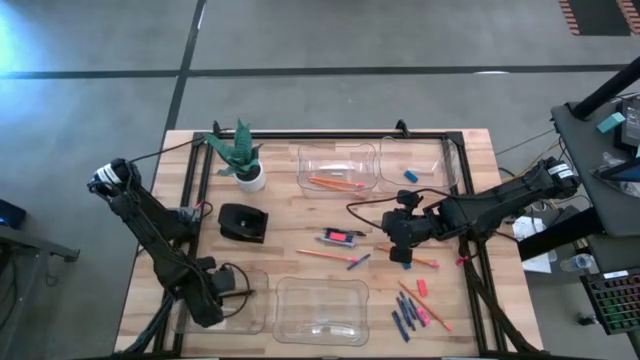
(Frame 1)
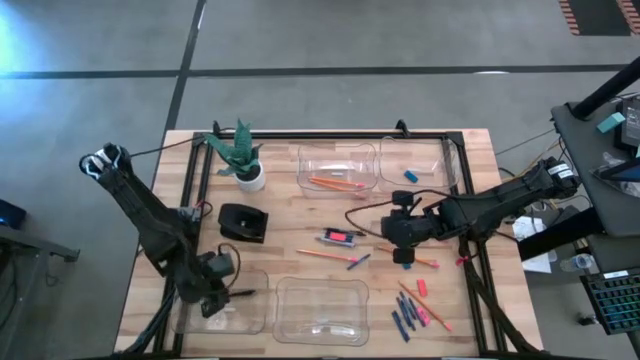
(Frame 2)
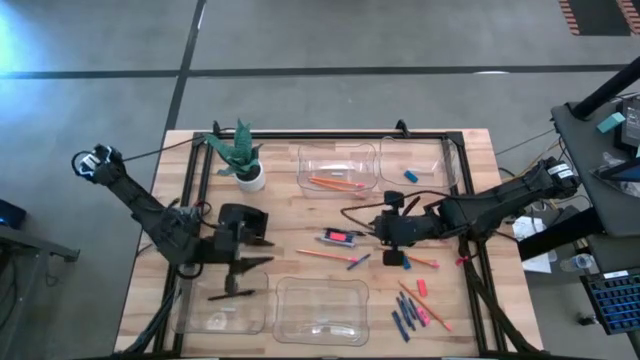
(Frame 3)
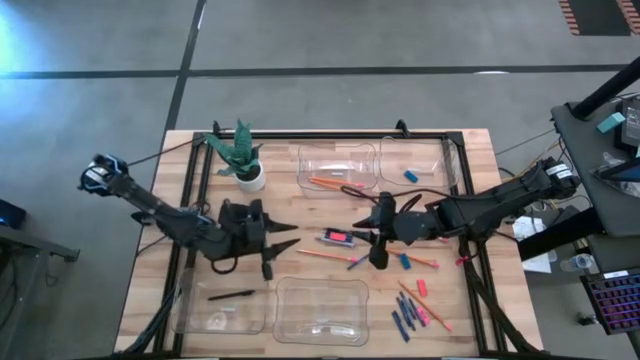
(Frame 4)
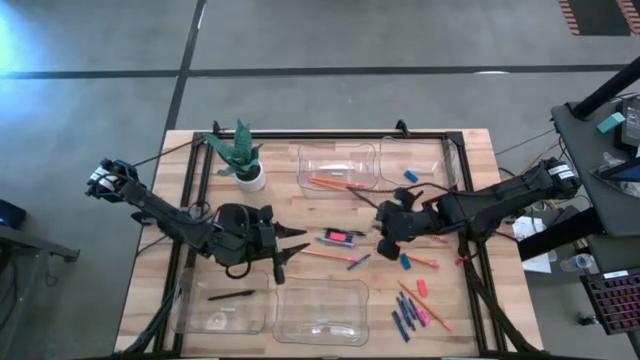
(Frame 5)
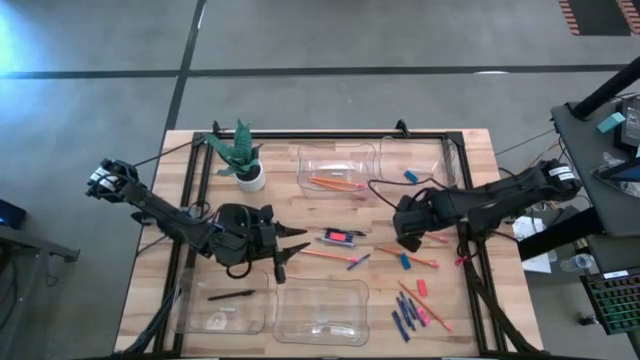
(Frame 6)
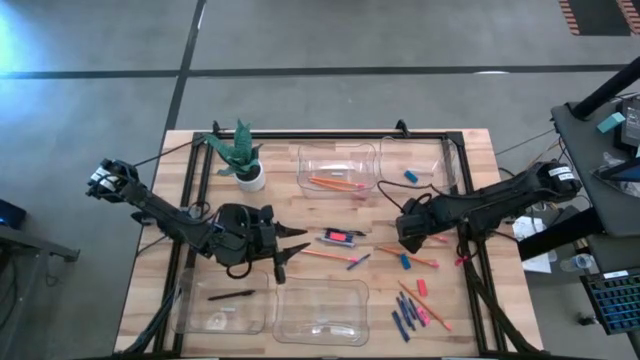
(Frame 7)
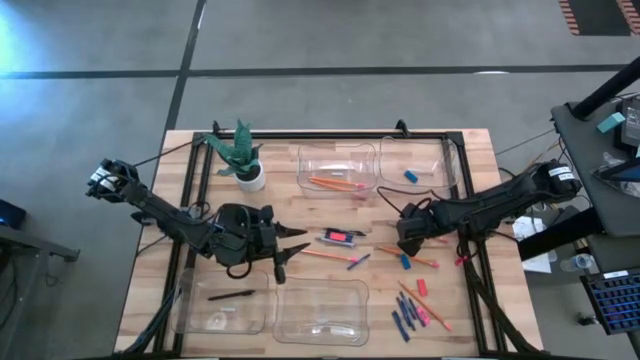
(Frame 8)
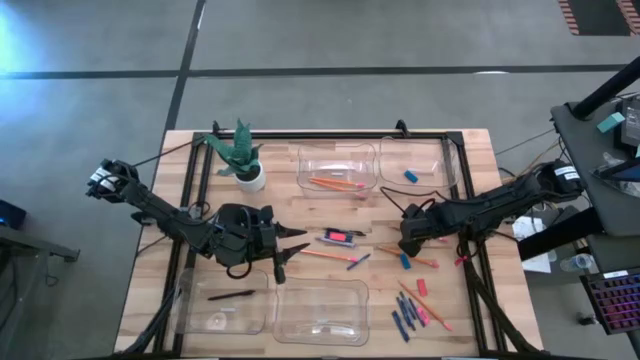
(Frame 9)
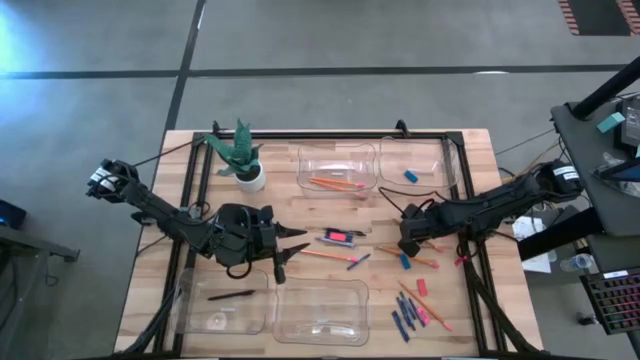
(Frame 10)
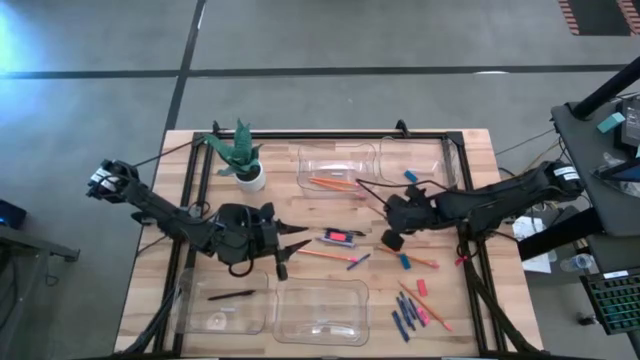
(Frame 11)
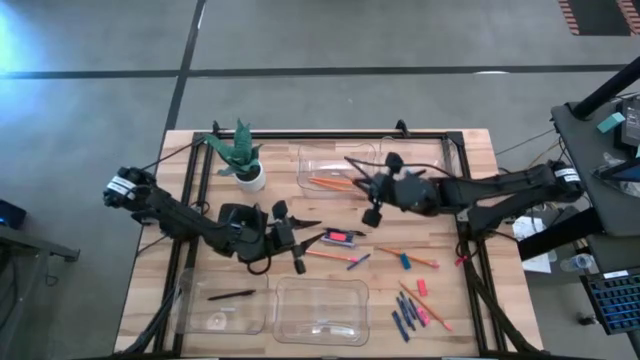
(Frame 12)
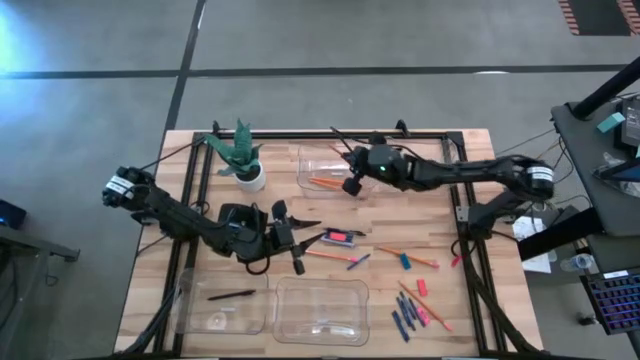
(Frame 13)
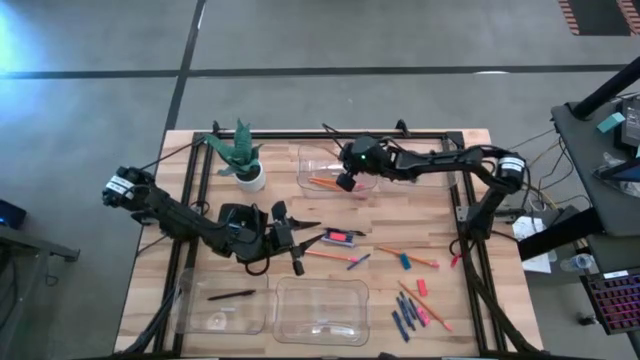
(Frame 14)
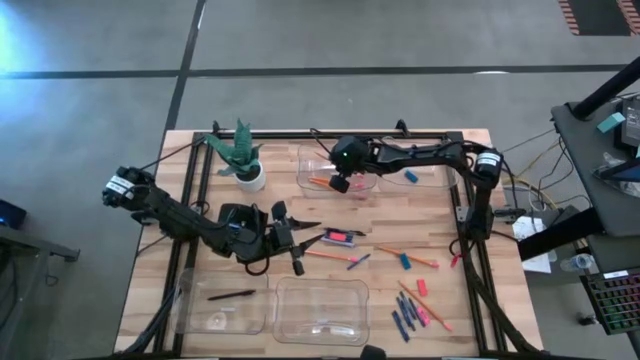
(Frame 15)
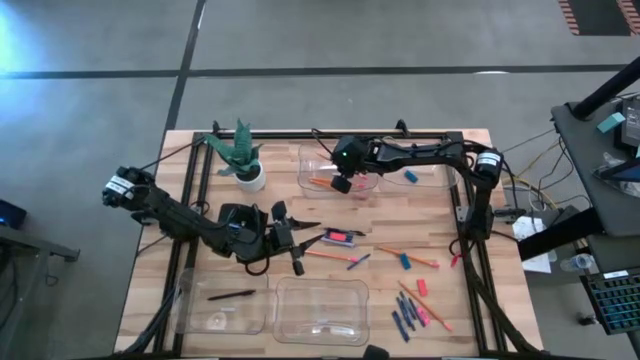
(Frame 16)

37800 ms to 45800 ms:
Task: Sort crayons/erasers/pens/pencils in bins
Put the yellow pencil into the top left transparent bin

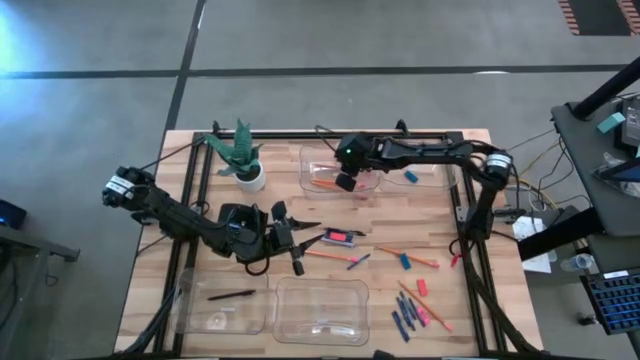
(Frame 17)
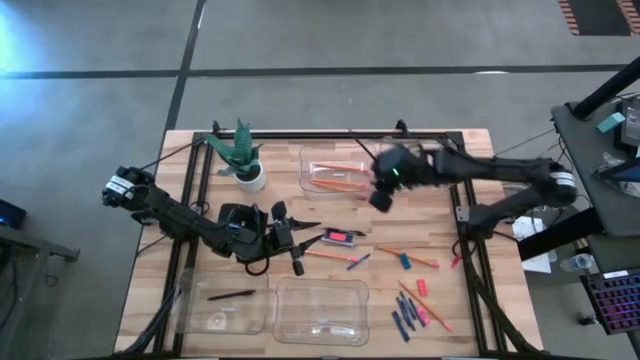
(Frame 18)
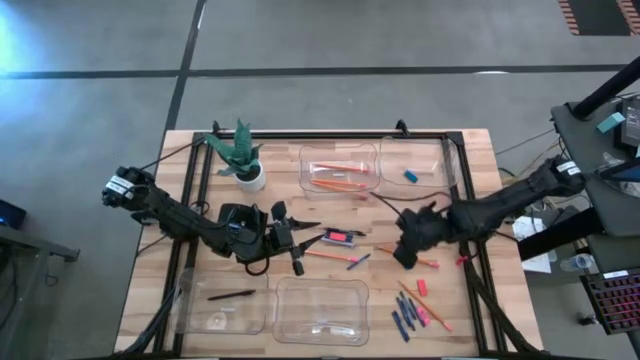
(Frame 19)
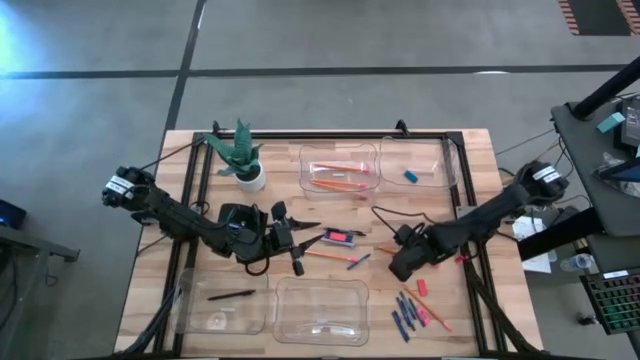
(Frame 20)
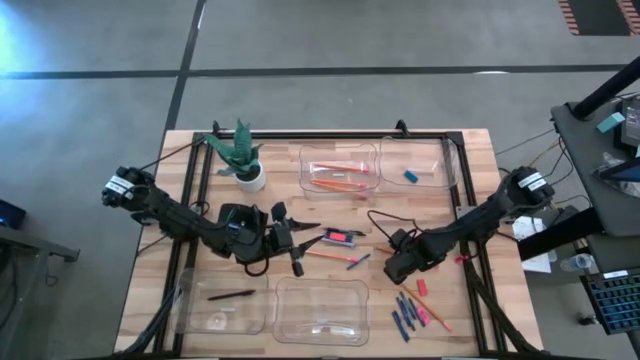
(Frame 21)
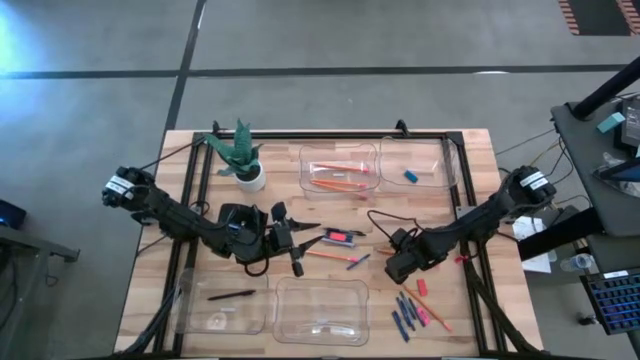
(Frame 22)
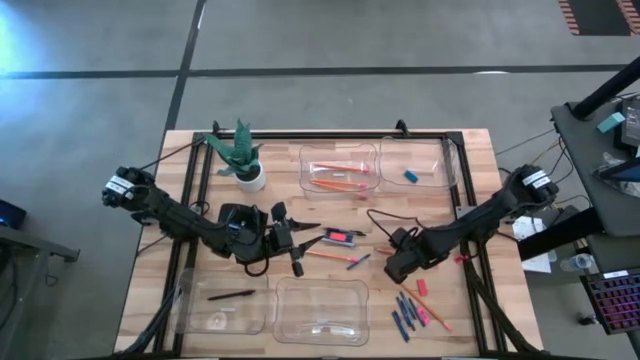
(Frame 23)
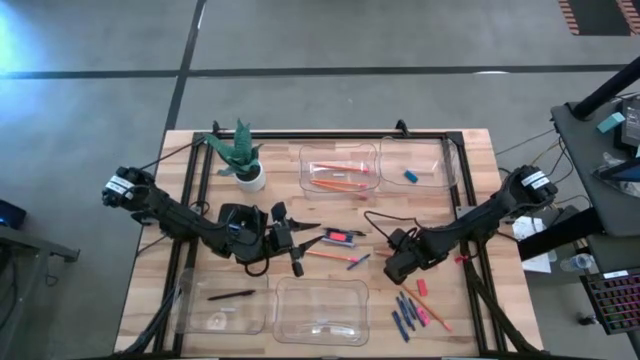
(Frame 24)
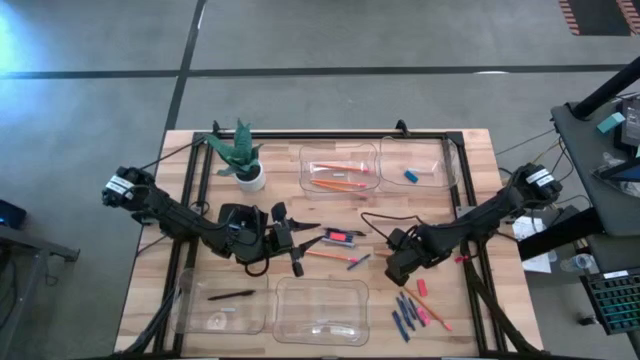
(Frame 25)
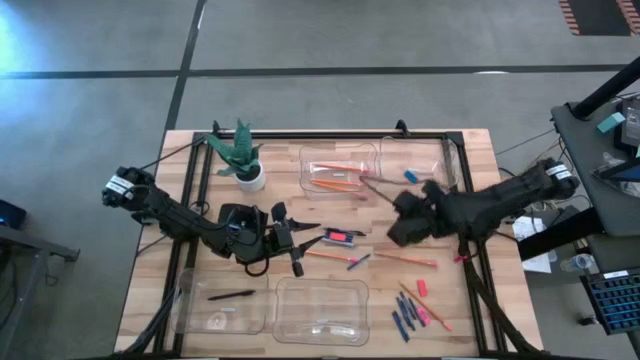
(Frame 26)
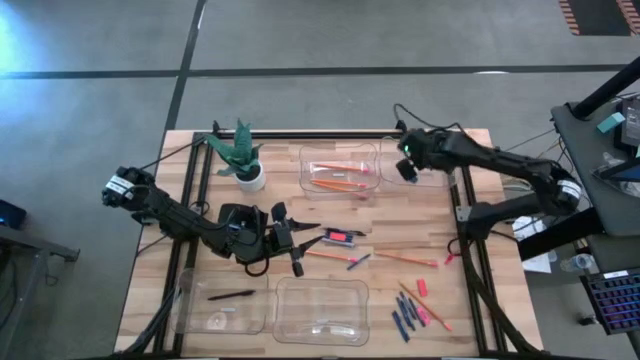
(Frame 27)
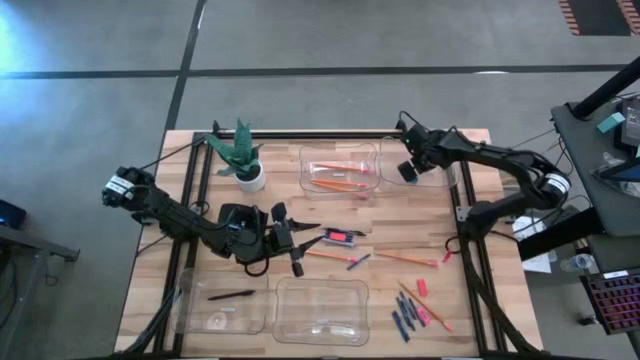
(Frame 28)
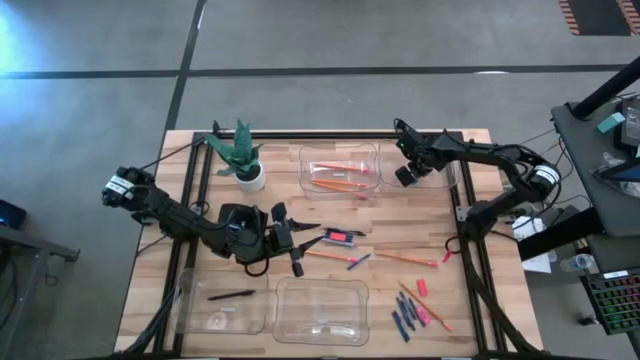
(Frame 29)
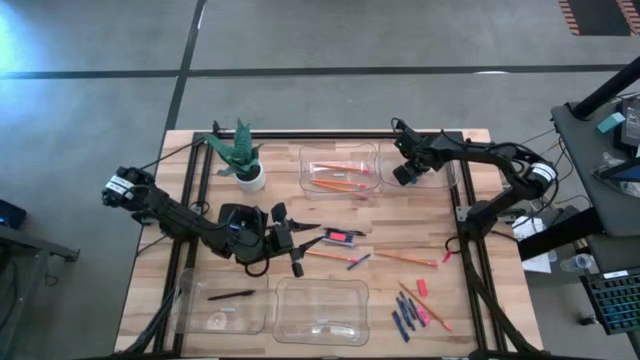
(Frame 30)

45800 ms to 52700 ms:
Put the blue eraser into the top right transparent bin

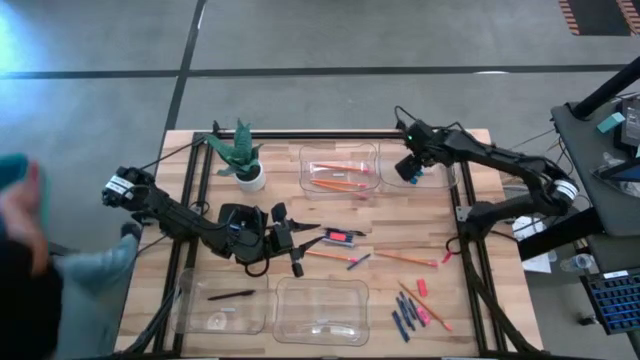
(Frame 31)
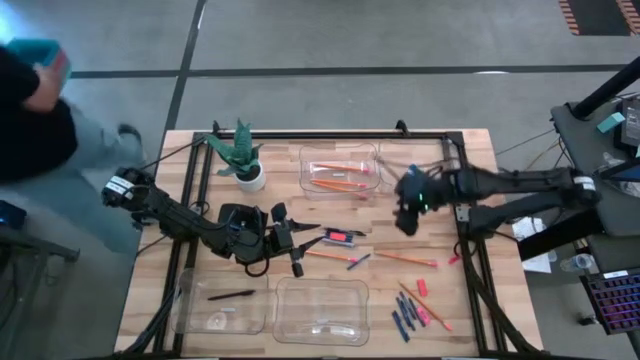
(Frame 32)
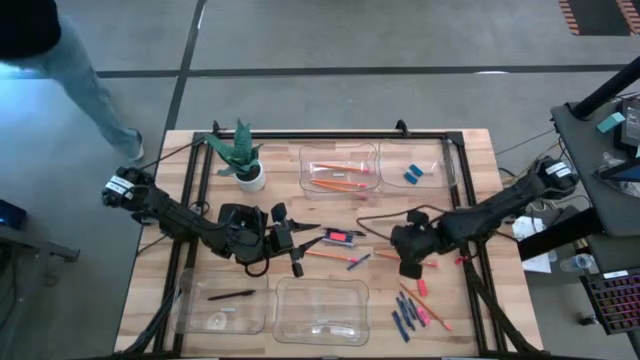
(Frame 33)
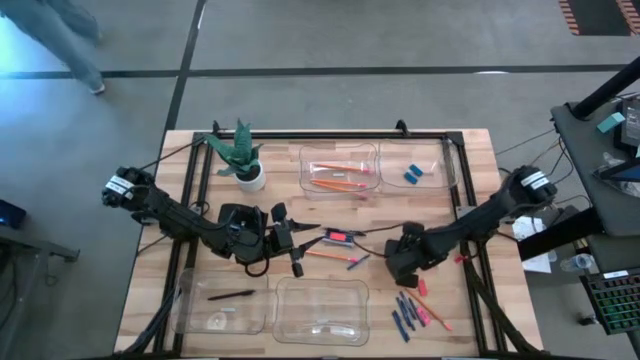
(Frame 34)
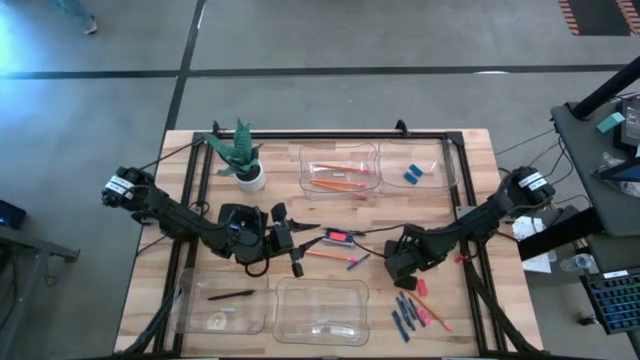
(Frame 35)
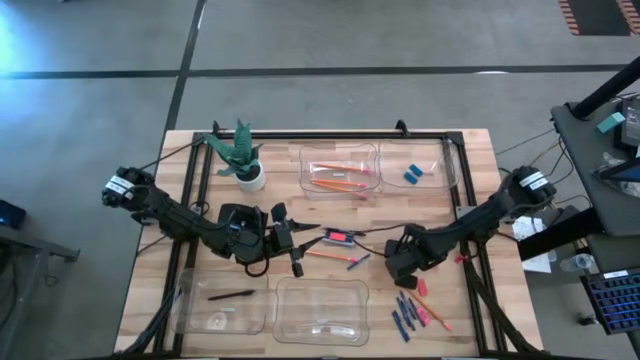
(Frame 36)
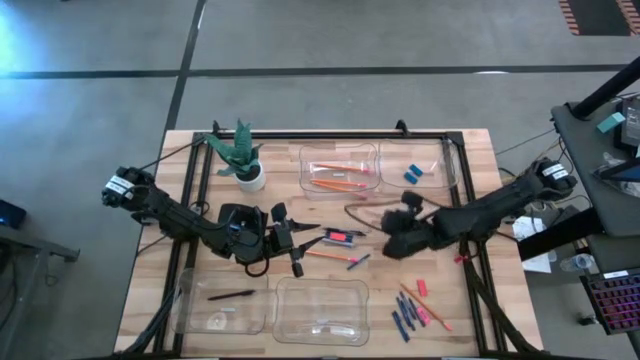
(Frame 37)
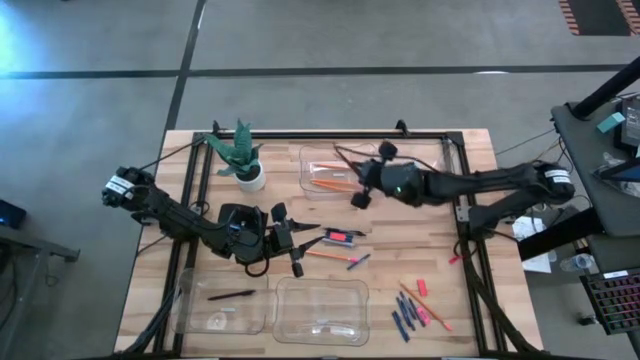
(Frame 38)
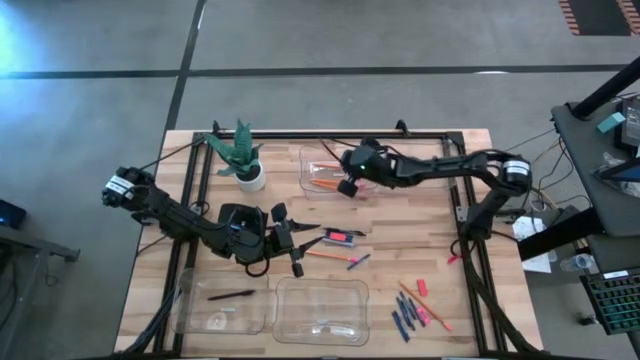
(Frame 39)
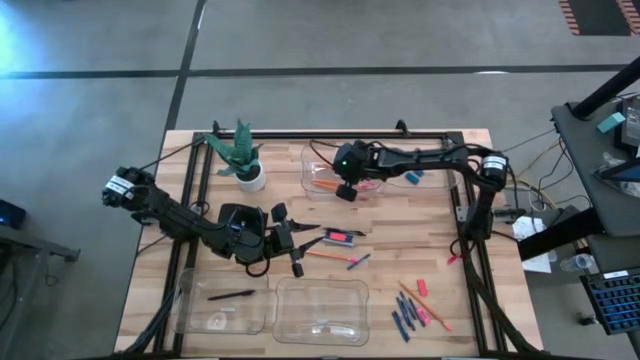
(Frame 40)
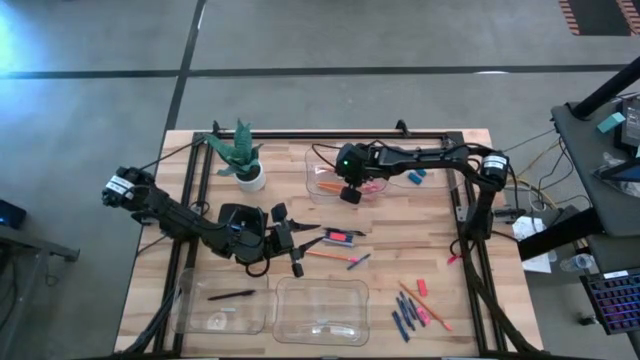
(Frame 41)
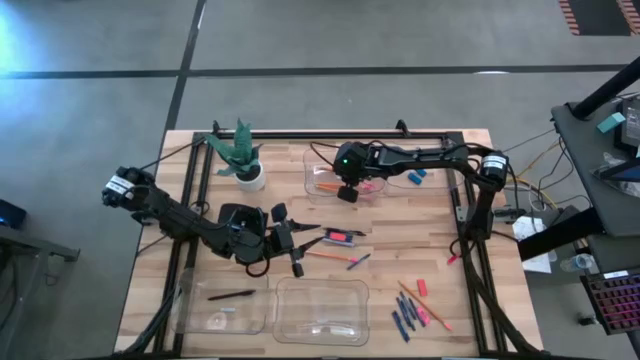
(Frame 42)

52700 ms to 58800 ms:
Put the yellow pencil into the top left transparent bin
